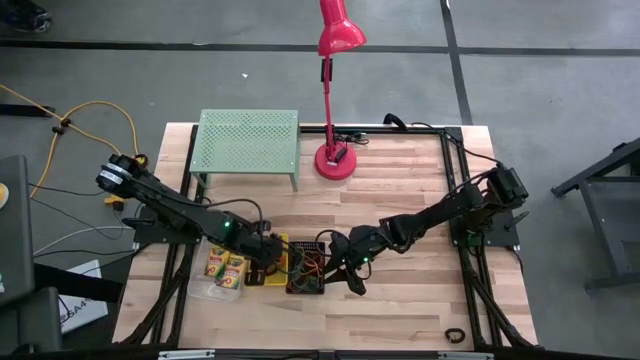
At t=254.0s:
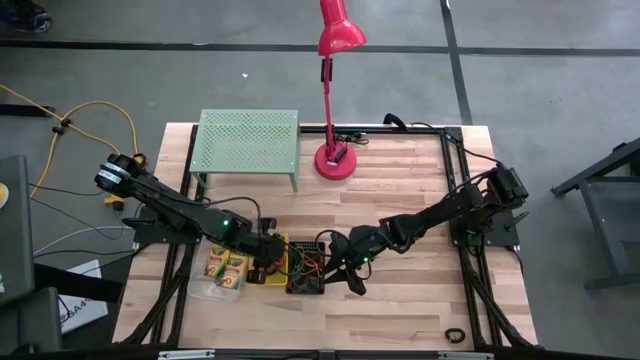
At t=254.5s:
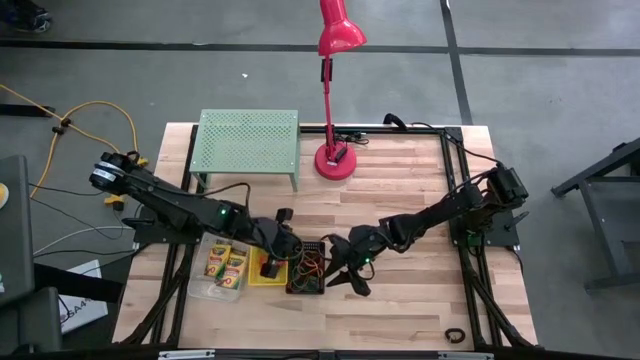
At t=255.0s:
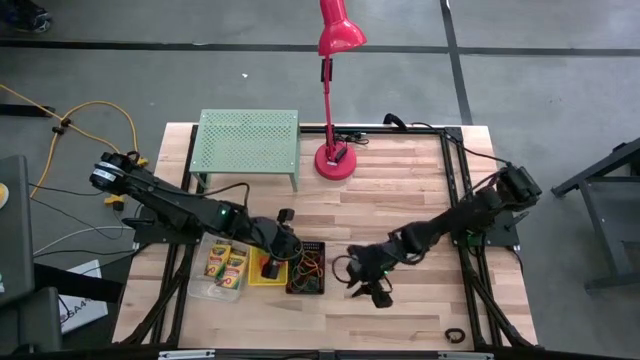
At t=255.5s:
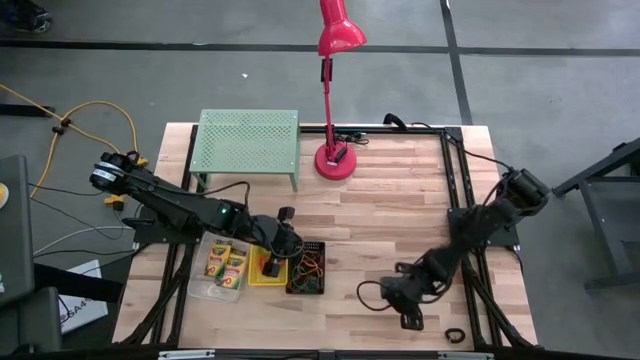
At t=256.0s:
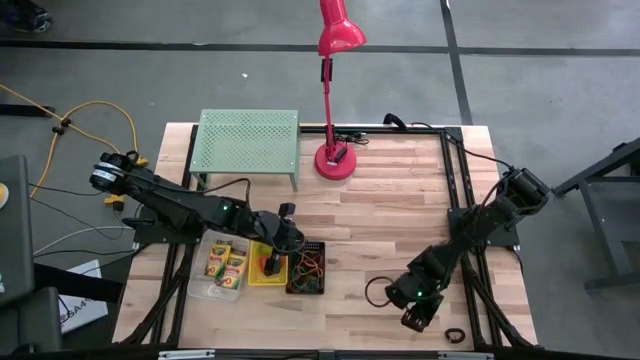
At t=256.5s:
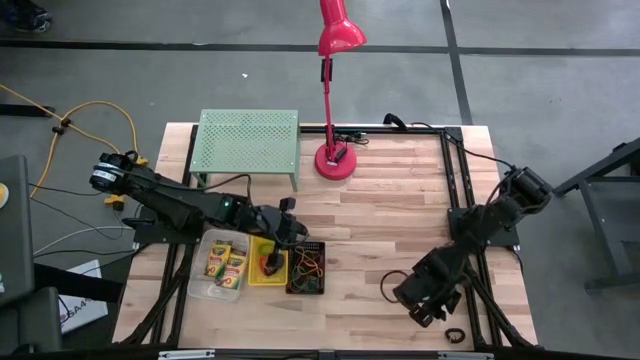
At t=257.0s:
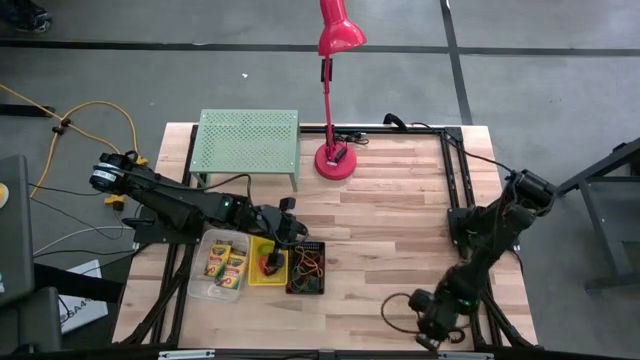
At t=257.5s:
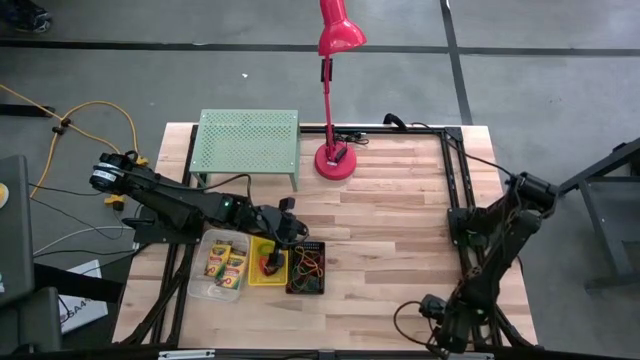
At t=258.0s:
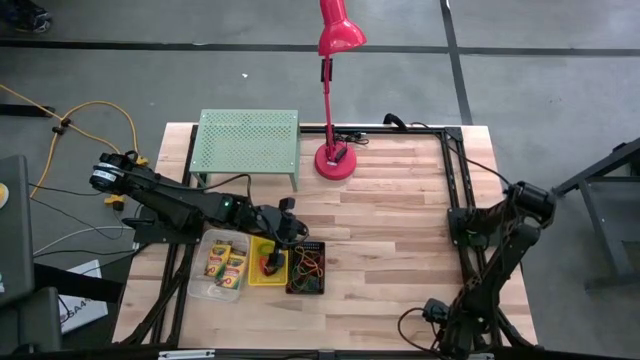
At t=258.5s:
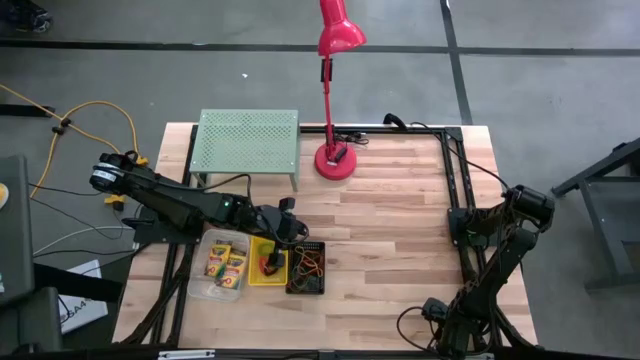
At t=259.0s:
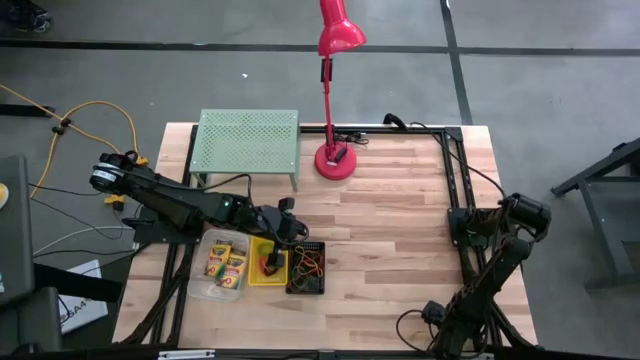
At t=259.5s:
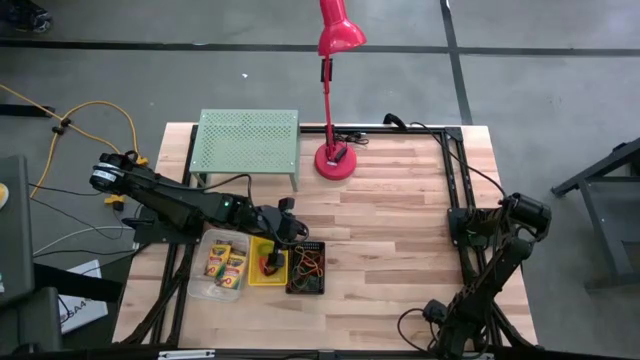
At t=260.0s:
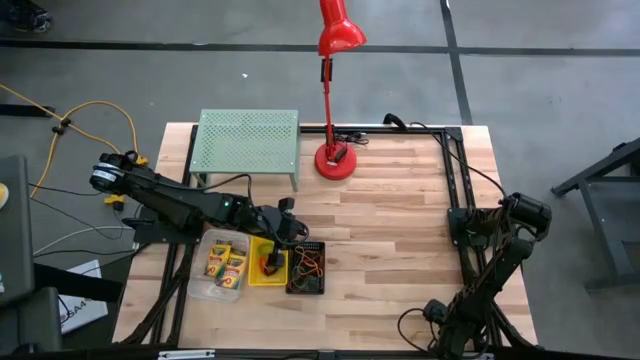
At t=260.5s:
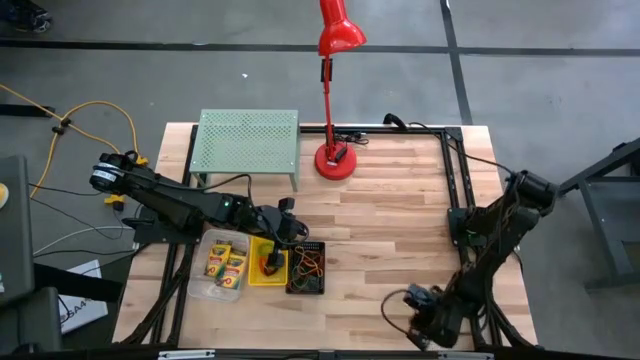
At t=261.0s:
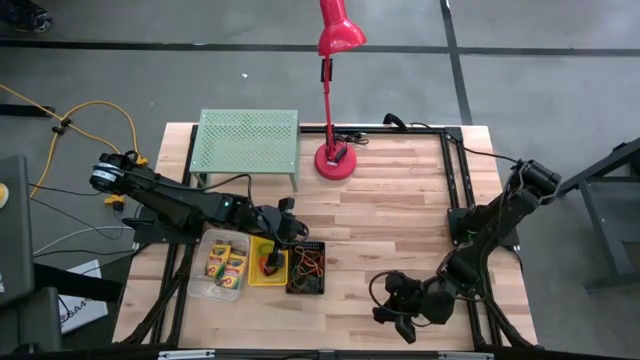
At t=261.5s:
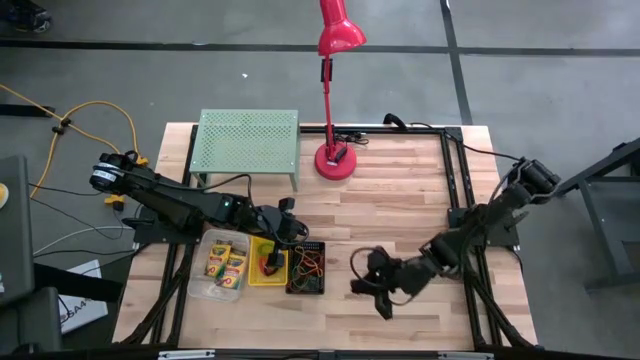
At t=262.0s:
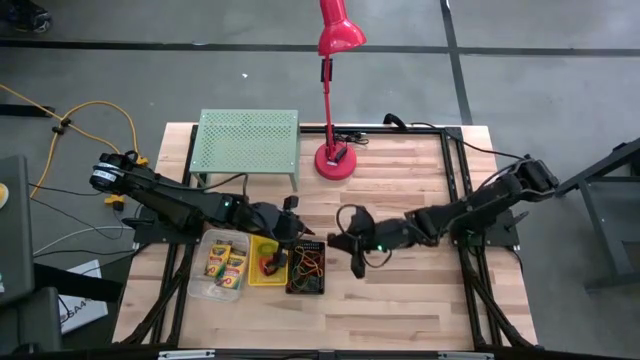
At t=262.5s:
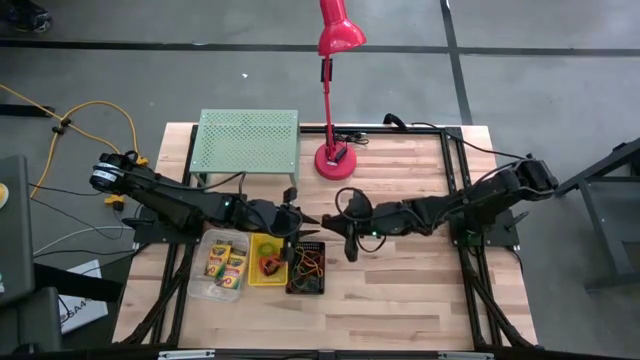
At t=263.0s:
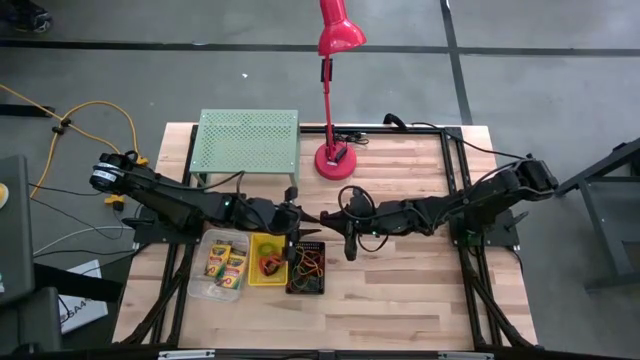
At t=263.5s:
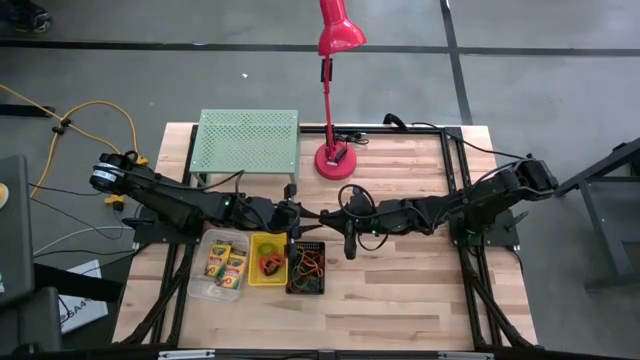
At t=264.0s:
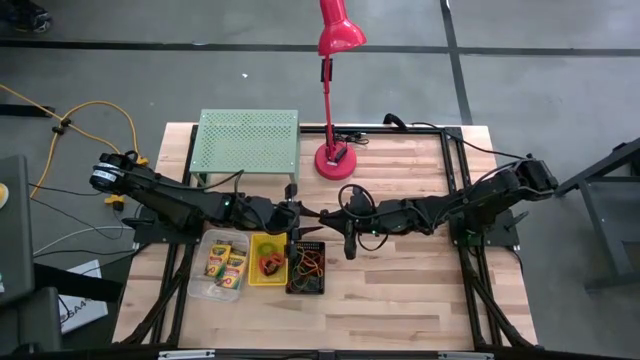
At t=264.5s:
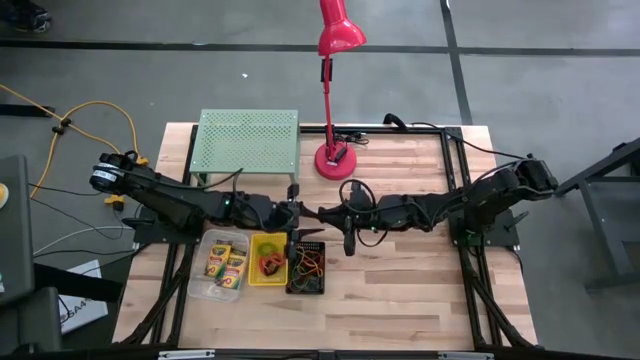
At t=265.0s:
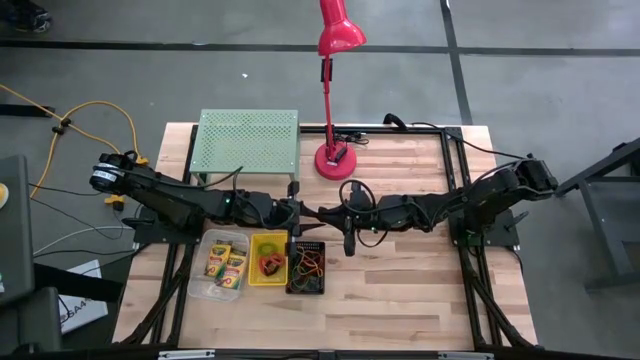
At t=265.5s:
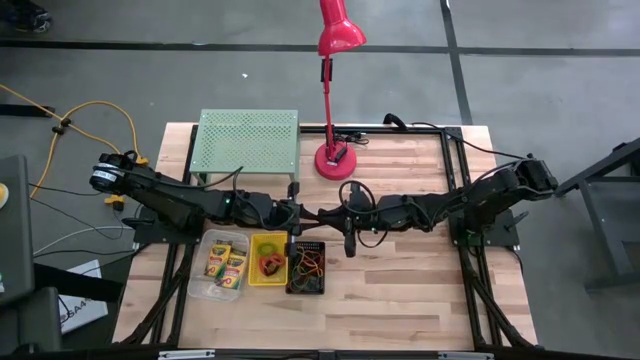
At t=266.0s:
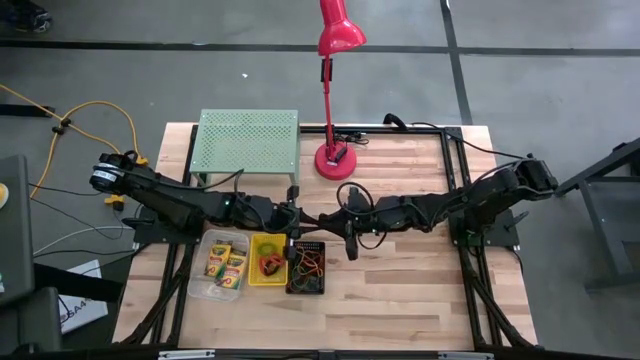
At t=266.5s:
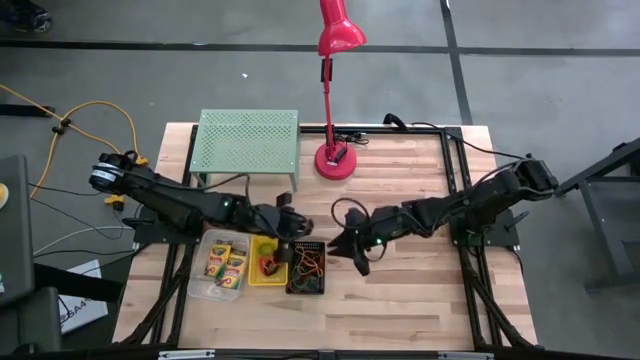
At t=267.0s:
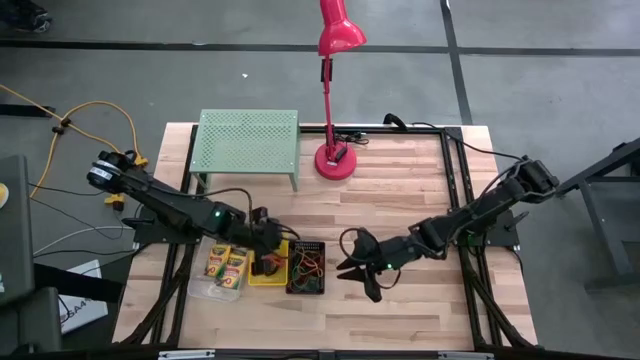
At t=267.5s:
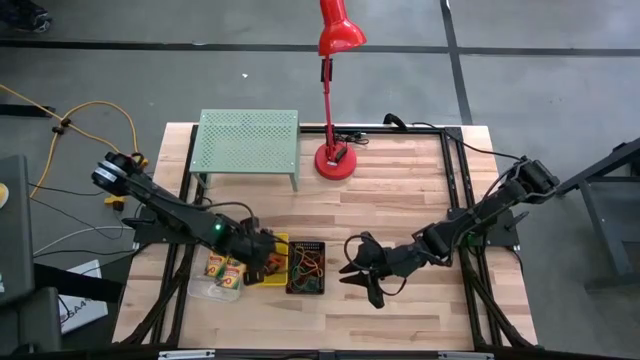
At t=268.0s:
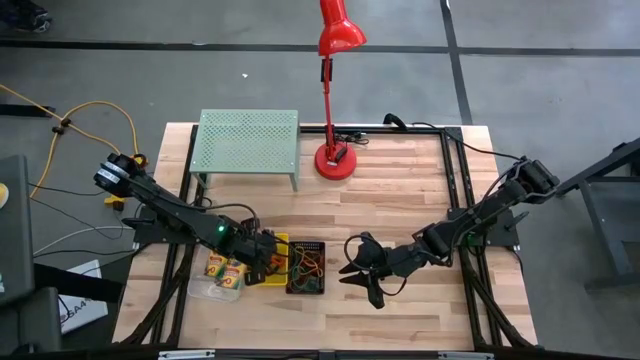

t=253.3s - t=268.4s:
Task: Pick & Place Office Desk Supplies
Put the black spring keychain into the yellow bin

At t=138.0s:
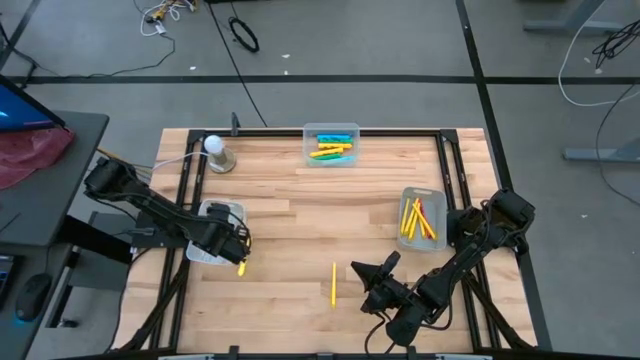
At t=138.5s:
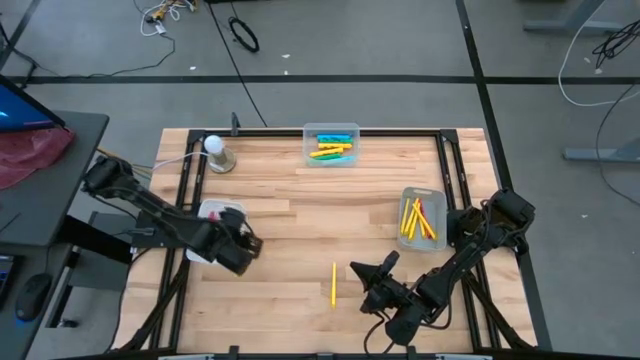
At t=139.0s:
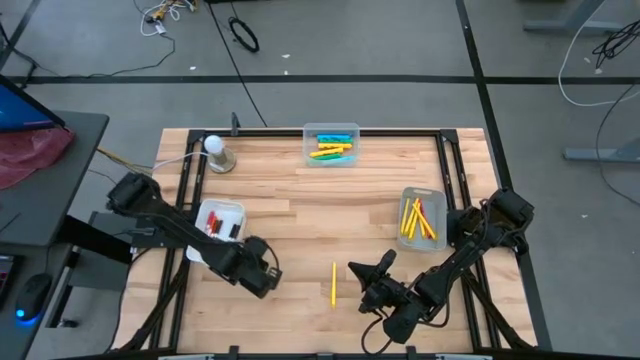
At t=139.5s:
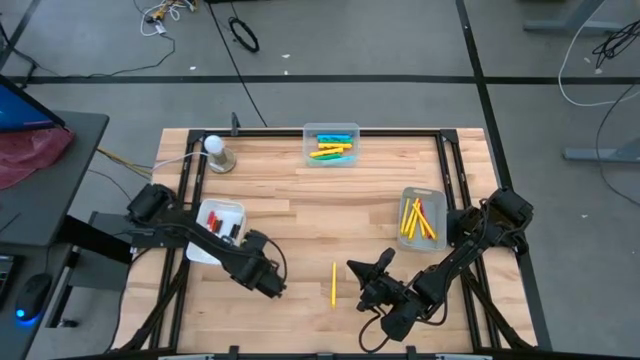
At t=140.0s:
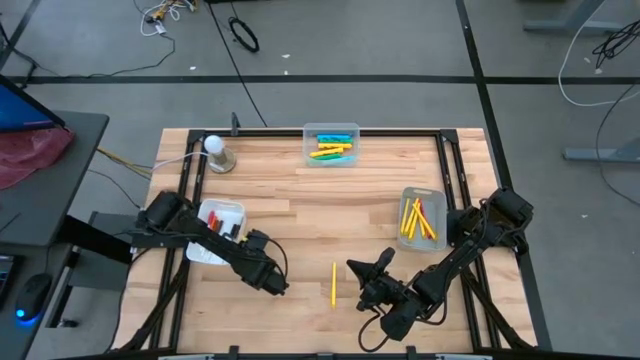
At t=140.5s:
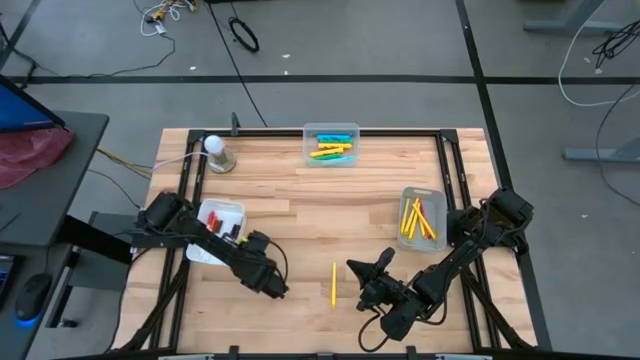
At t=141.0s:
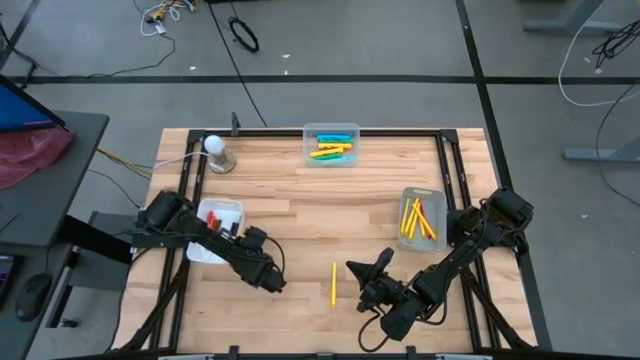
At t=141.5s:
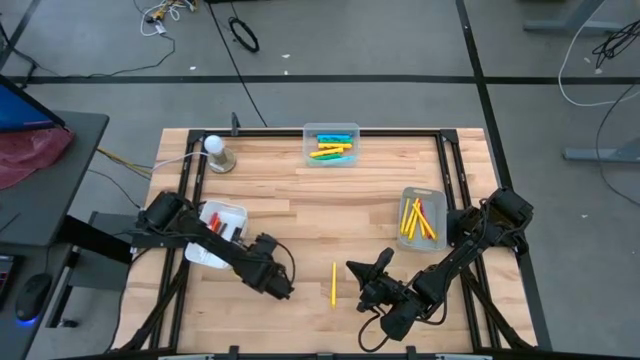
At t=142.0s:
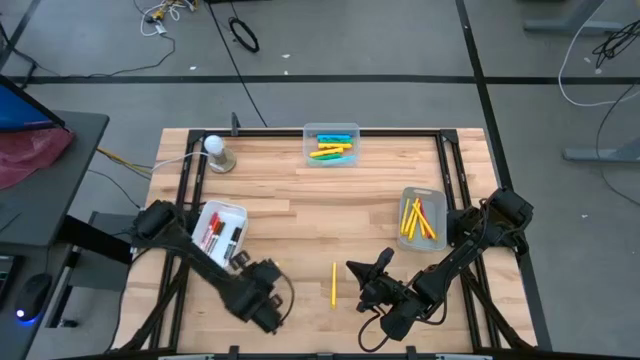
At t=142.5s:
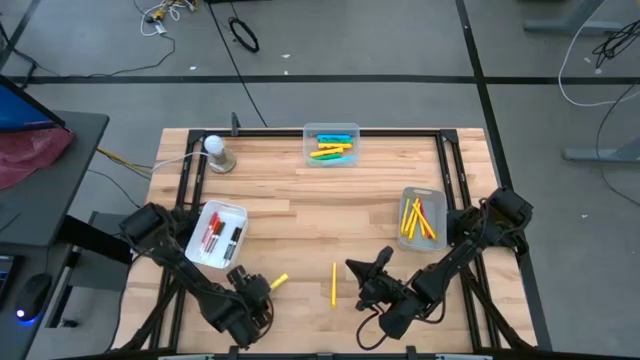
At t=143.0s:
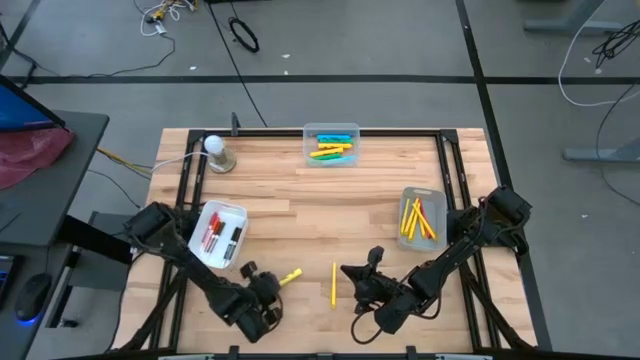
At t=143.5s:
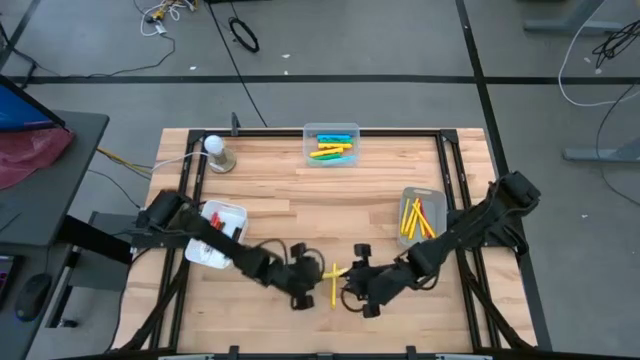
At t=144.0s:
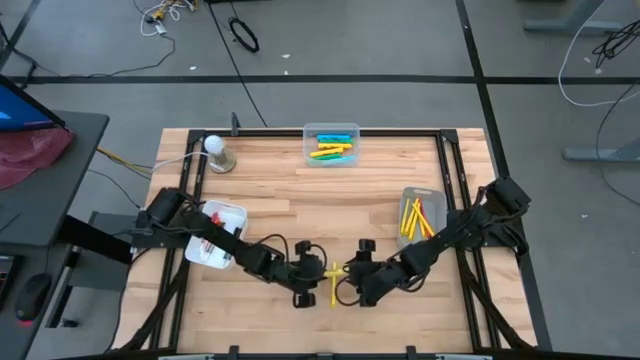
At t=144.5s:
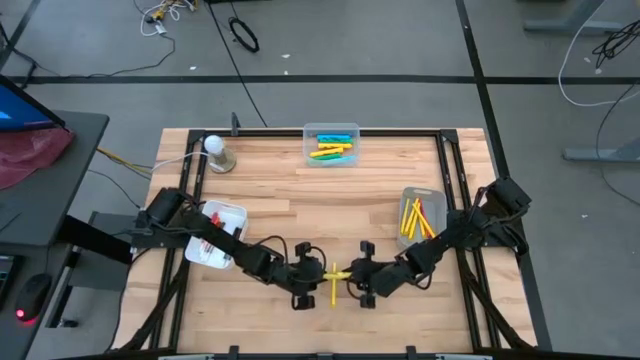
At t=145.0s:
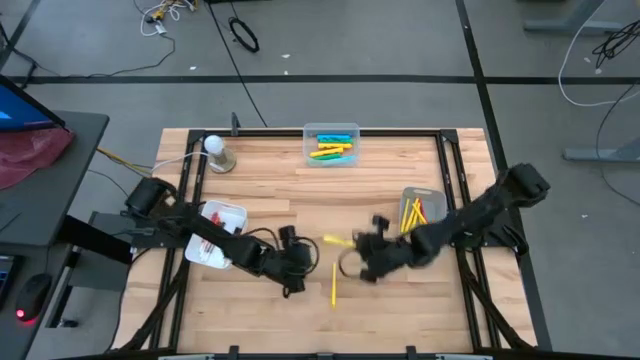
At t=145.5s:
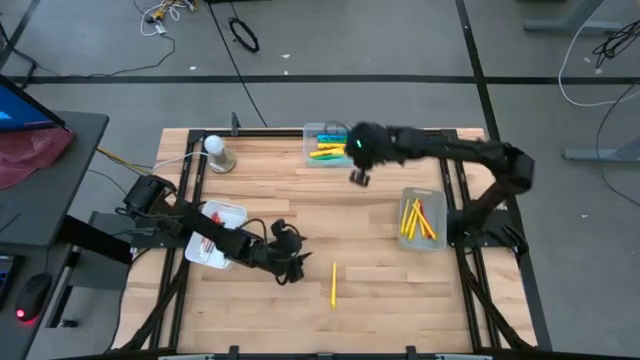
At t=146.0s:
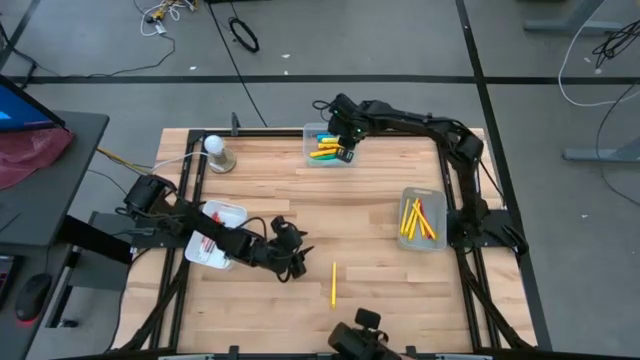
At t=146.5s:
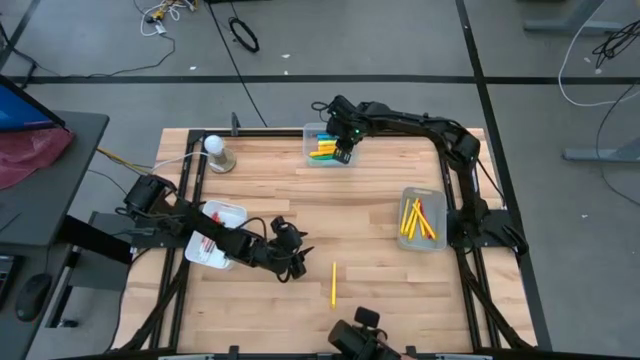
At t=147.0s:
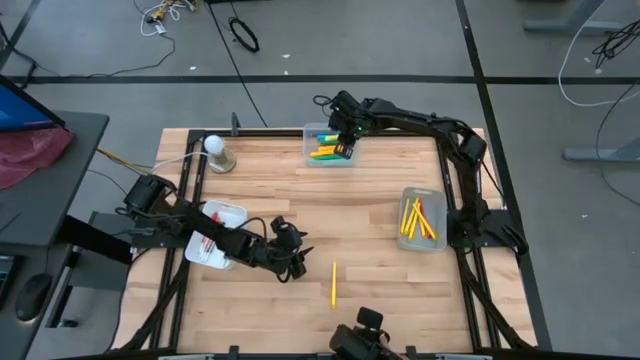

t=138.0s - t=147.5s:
Task: Pick & Place Markers
Put the yellow highlighter into the transparent bin
